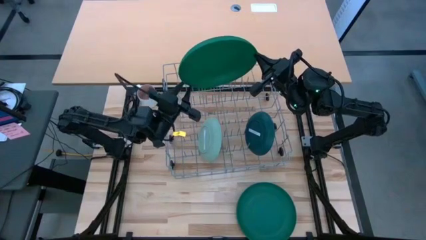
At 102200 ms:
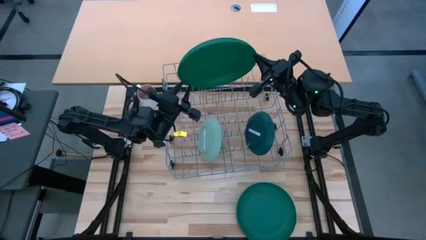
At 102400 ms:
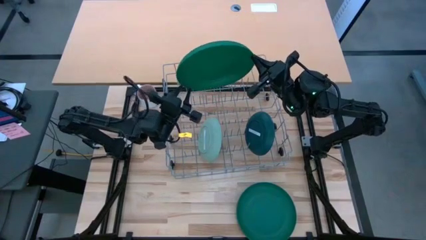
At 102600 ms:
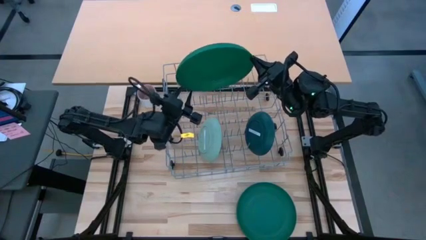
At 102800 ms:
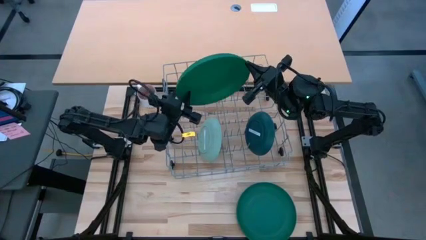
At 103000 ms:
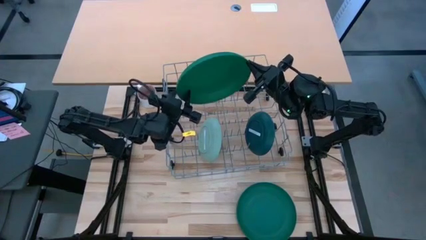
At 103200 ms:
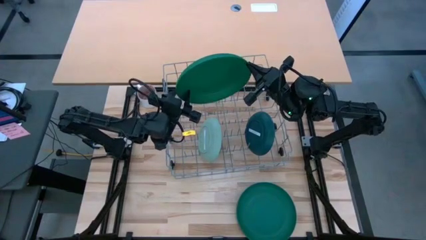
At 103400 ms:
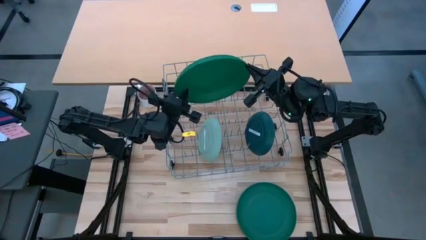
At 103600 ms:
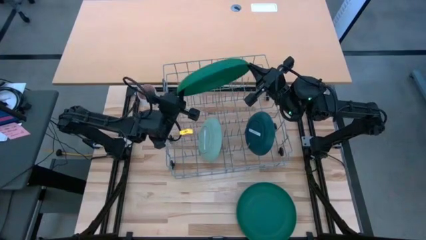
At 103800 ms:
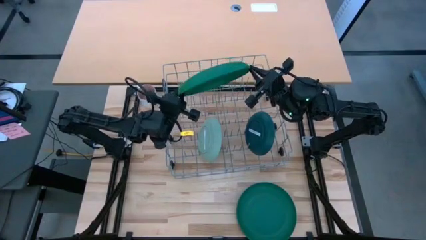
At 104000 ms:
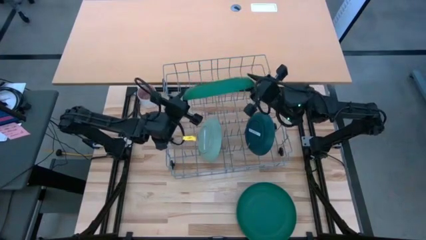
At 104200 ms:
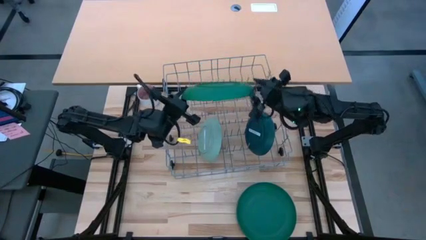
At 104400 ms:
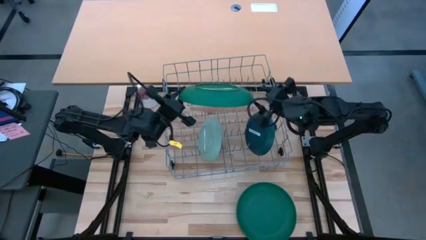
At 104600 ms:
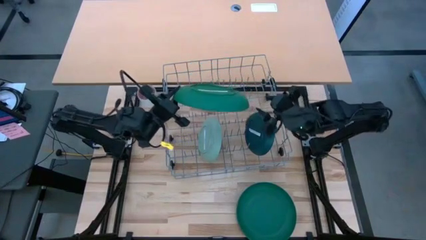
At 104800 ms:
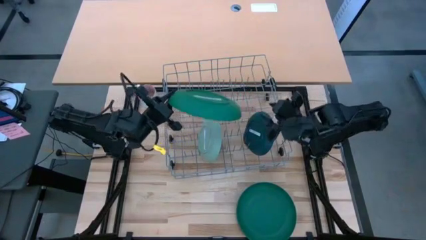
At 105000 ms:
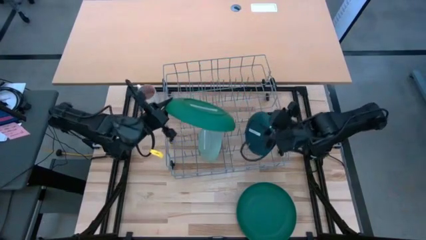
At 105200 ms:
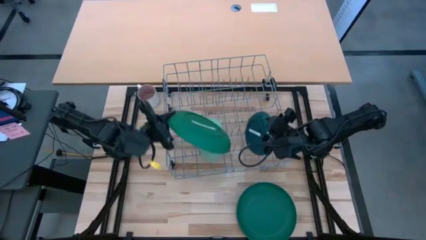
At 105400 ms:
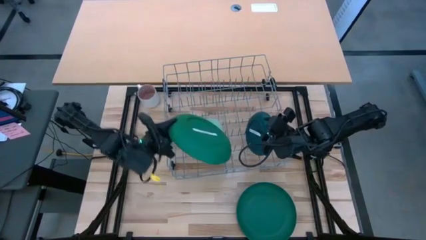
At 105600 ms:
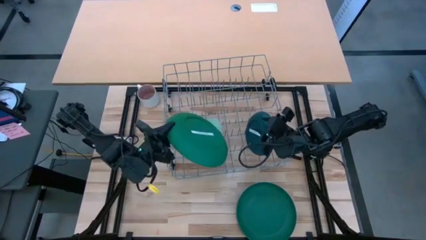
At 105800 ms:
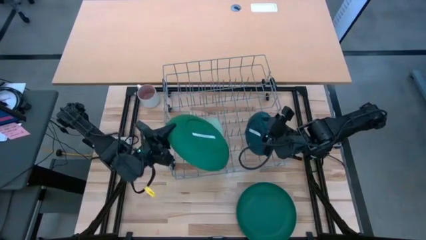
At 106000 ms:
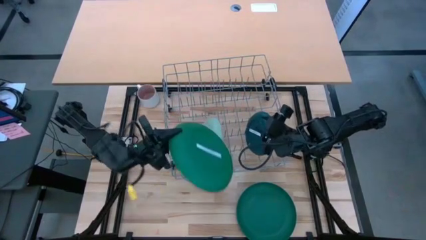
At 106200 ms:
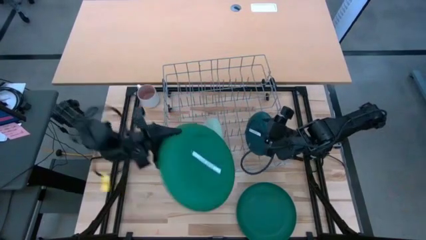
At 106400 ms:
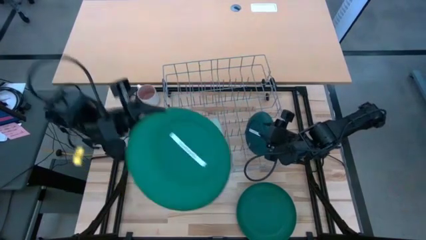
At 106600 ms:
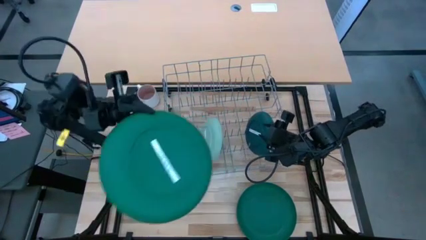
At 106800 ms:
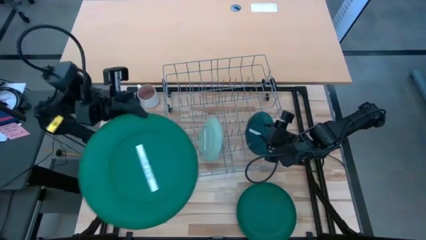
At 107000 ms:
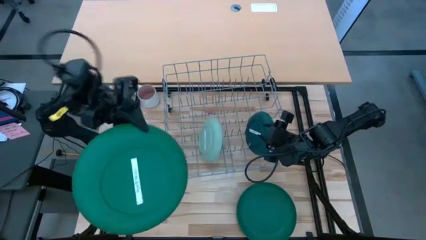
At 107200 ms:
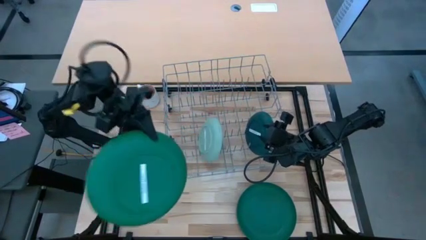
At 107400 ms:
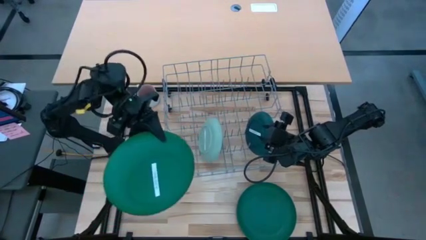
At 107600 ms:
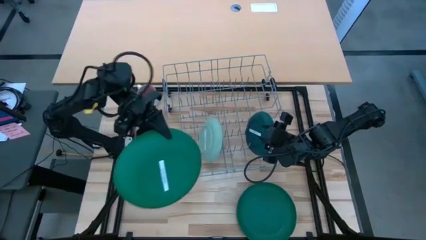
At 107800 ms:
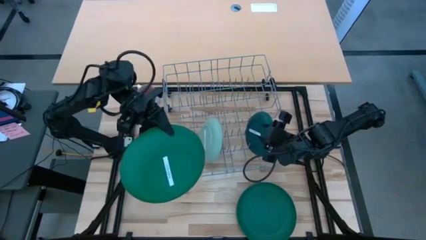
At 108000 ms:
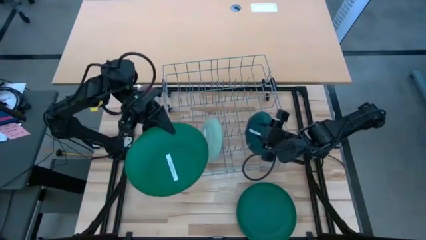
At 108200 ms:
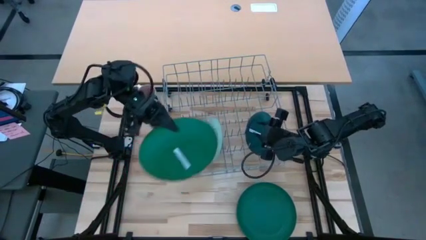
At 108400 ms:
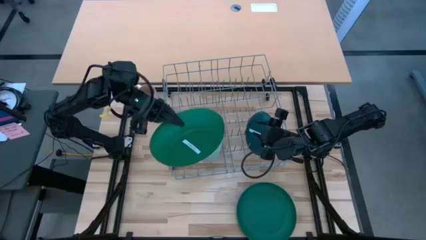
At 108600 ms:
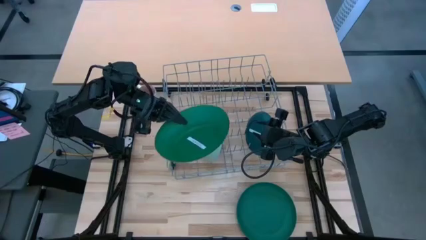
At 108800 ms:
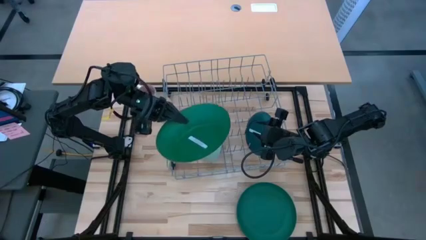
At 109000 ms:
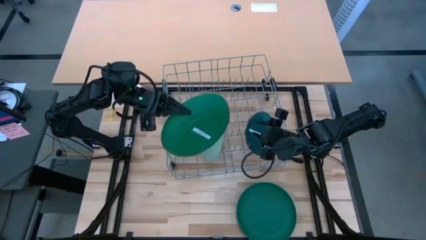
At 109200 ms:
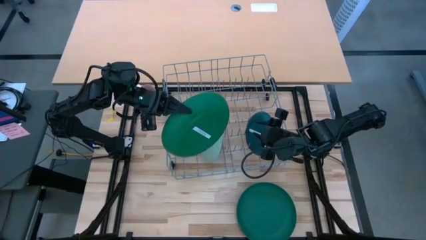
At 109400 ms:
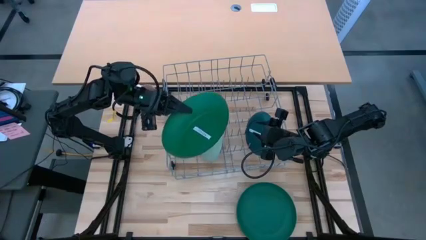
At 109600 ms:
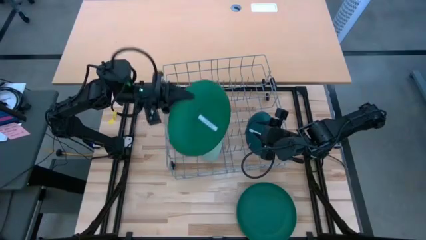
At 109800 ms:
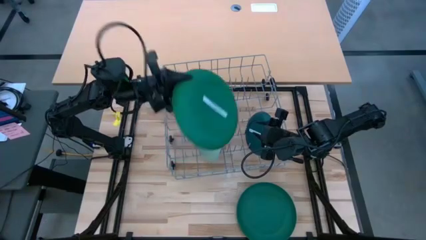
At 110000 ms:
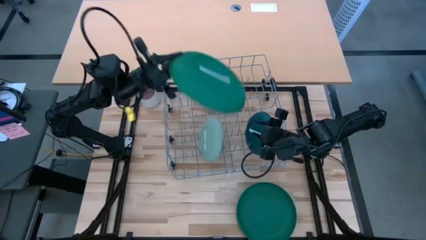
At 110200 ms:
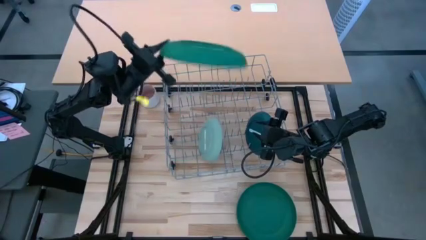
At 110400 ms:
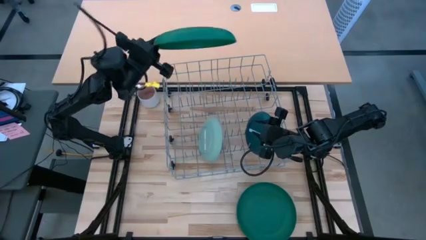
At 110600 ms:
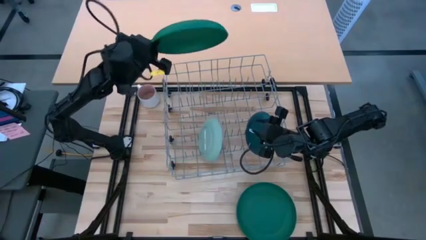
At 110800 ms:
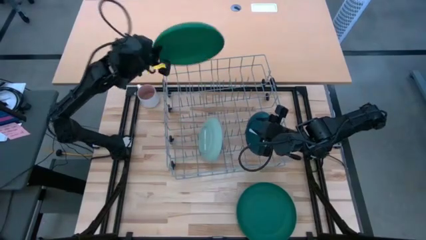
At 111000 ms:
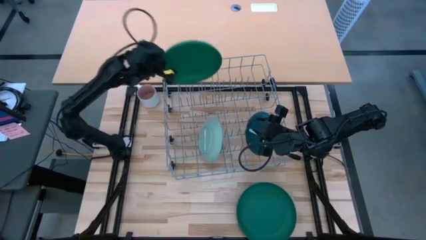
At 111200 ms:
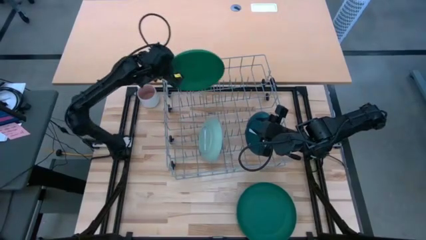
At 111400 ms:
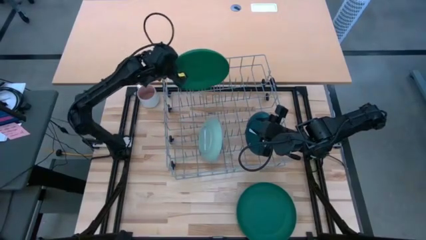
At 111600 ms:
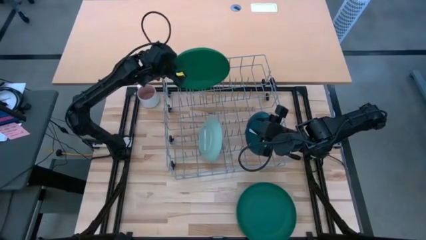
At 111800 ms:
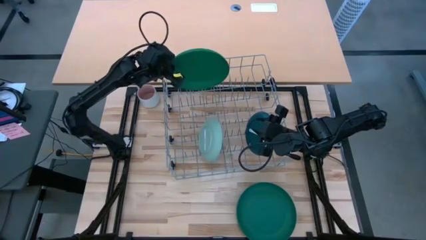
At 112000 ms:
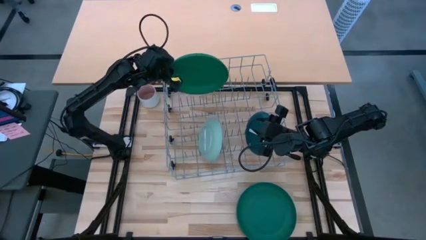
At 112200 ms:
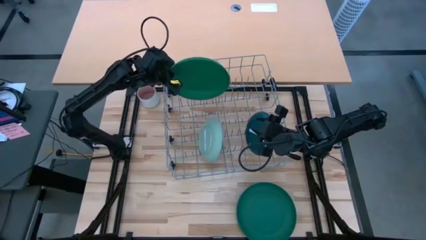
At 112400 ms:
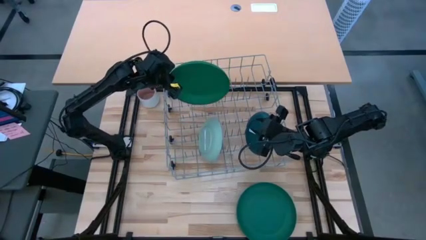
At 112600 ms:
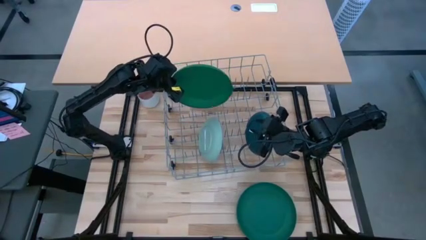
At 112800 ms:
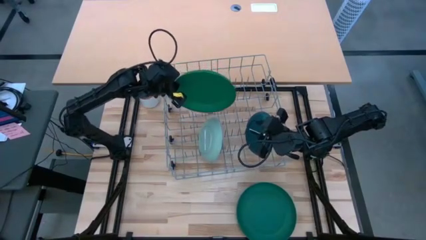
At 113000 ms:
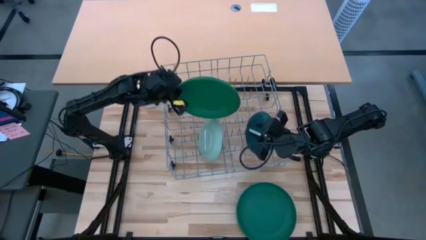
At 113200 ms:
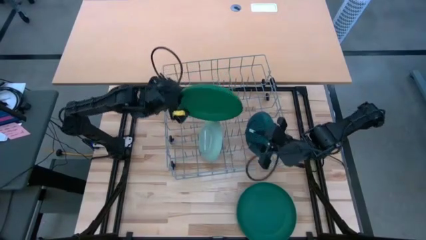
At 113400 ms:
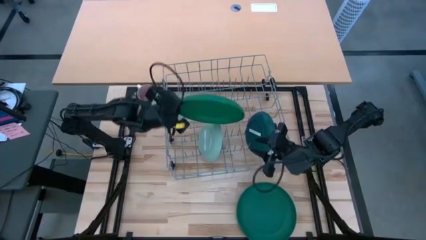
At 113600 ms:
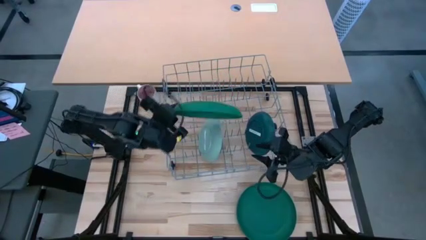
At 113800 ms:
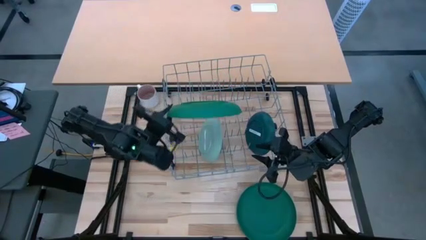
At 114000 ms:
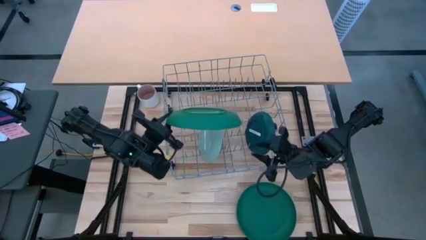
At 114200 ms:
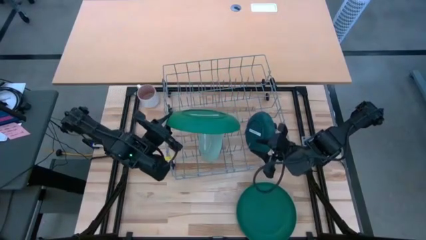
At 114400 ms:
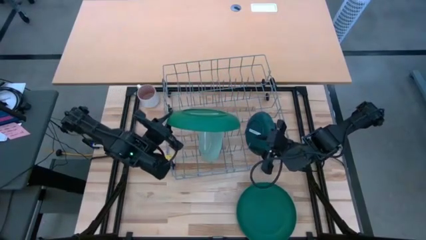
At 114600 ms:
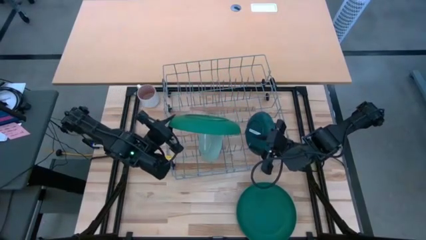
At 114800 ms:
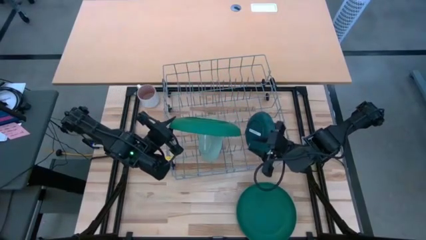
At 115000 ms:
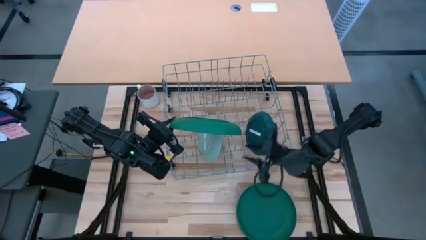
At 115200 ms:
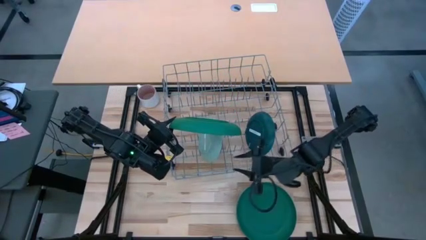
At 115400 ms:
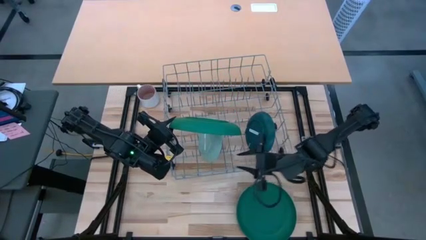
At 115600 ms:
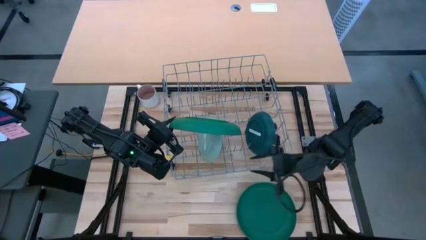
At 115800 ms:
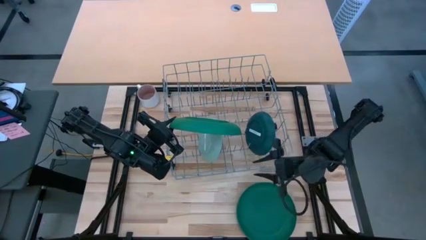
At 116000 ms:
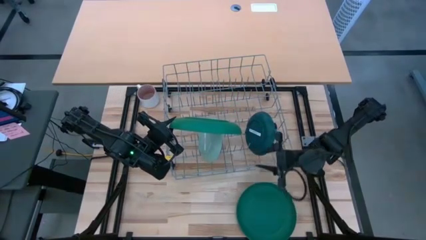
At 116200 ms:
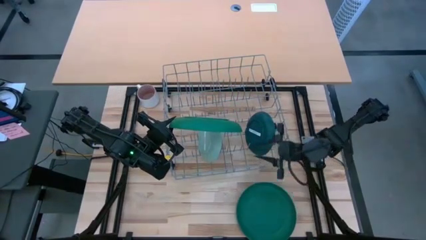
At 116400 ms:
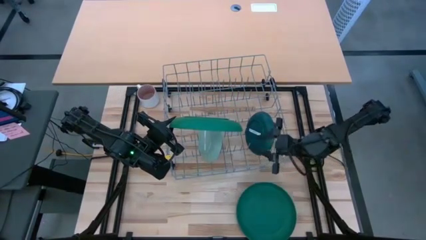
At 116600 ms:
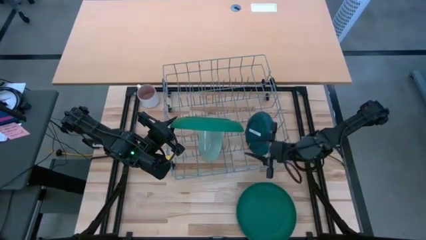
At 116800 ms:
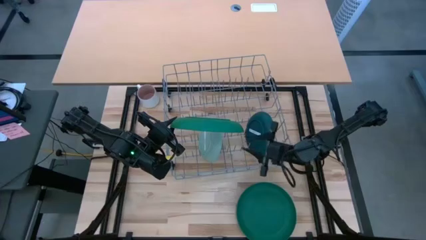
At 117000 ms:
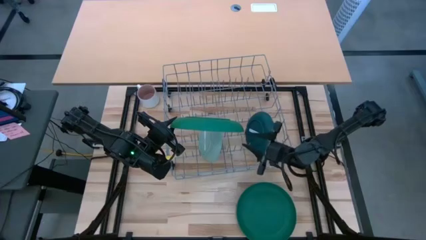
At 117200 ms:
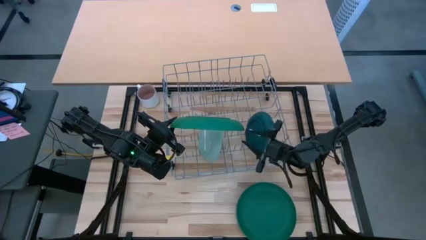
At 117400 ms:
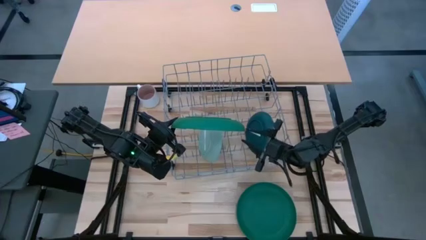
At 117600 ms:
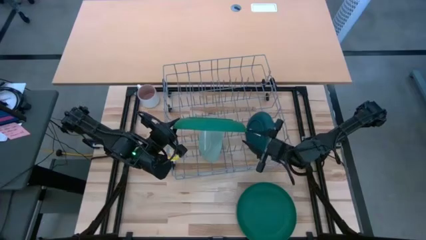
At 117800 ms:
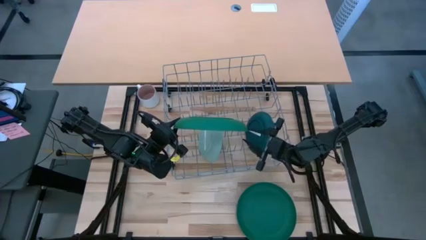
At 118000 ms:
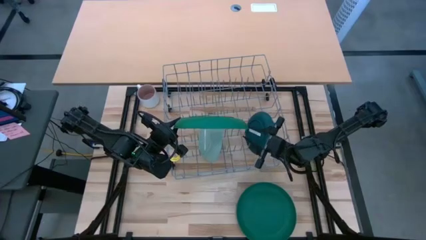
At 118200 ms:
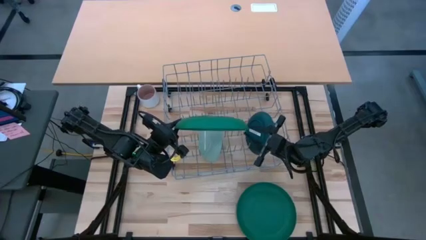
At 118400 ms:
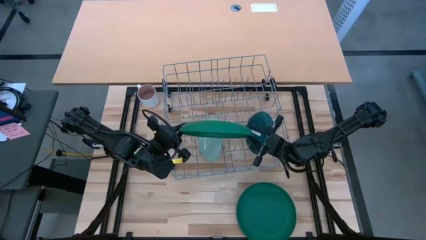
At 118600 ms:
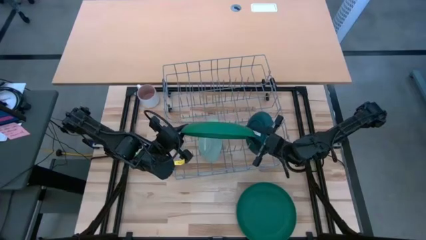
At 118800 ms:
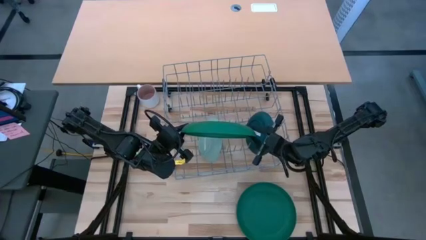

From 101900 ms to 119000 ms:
Task: Sort dishes
Put a green plate in the dish rack
